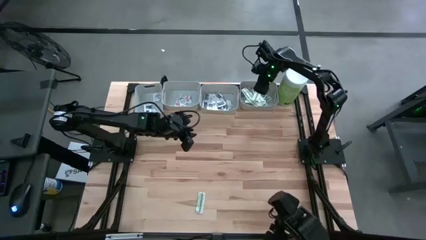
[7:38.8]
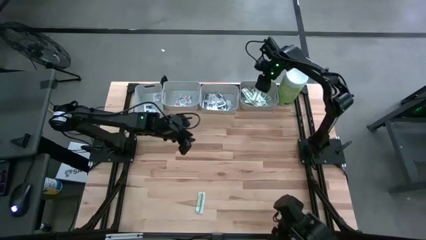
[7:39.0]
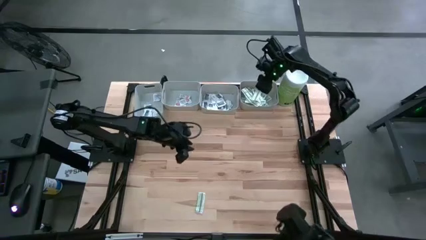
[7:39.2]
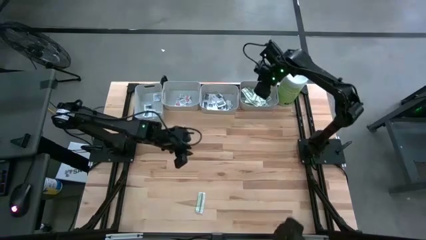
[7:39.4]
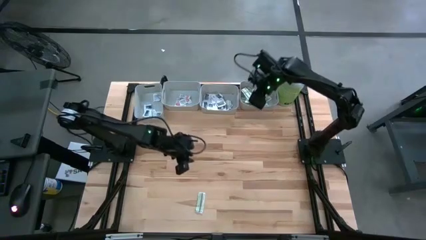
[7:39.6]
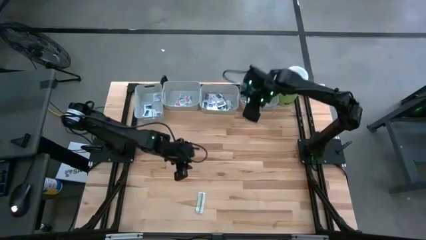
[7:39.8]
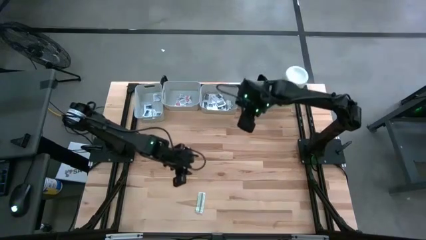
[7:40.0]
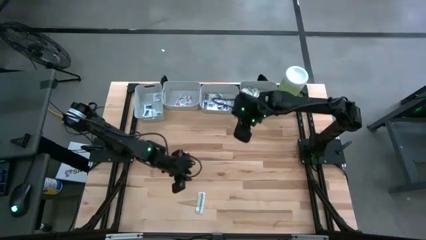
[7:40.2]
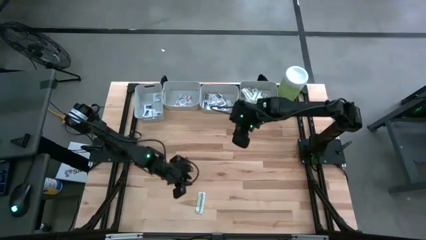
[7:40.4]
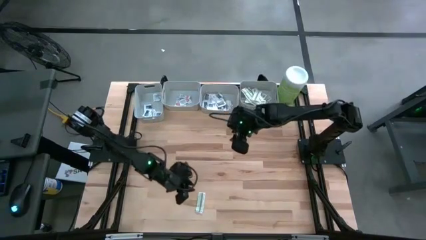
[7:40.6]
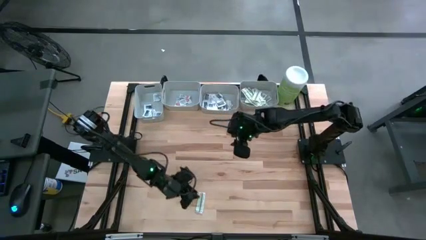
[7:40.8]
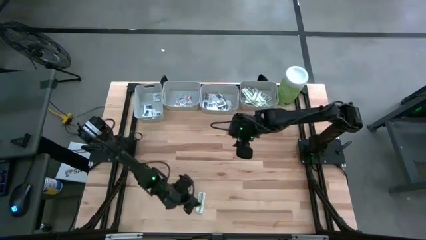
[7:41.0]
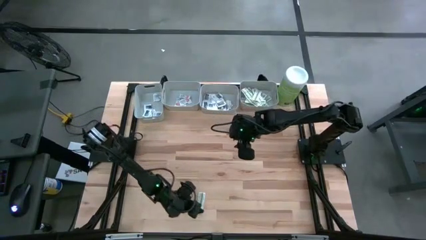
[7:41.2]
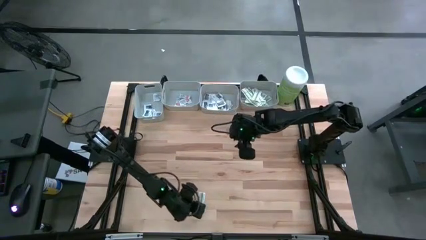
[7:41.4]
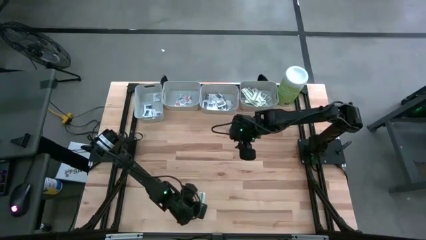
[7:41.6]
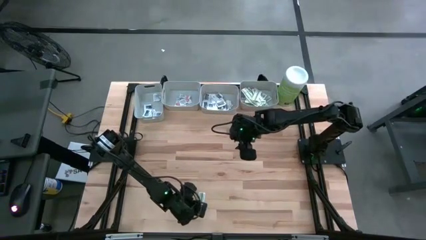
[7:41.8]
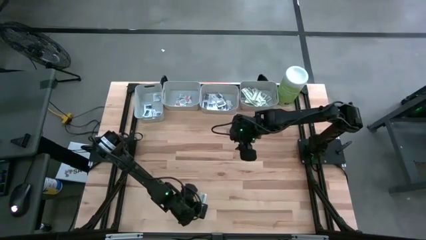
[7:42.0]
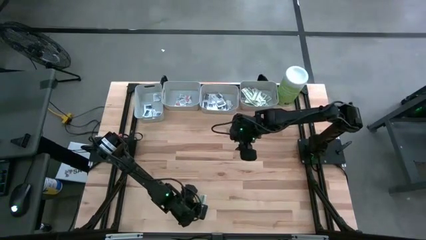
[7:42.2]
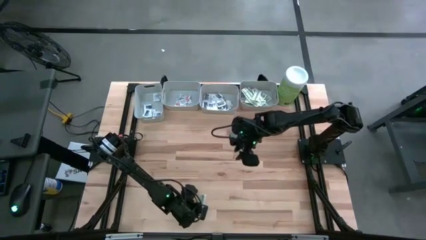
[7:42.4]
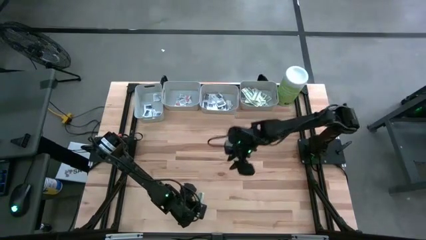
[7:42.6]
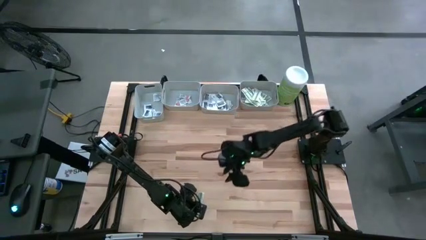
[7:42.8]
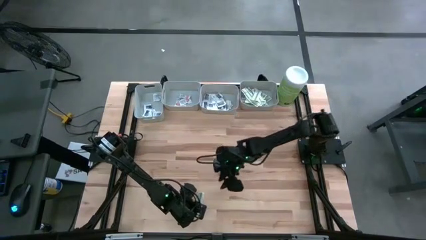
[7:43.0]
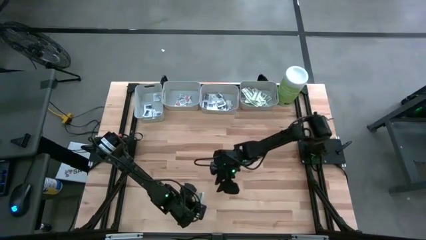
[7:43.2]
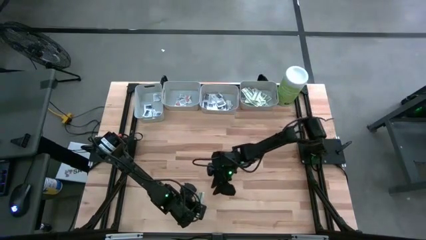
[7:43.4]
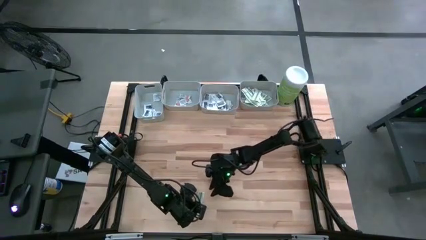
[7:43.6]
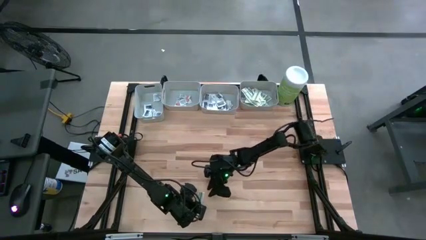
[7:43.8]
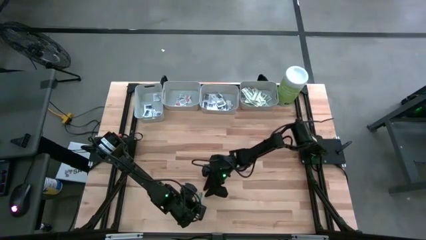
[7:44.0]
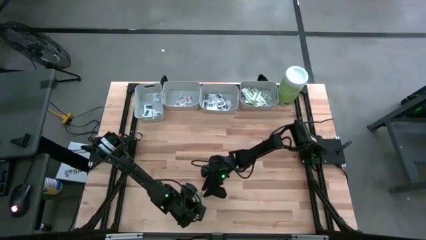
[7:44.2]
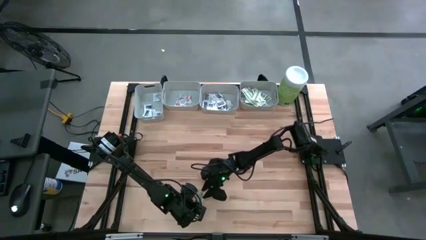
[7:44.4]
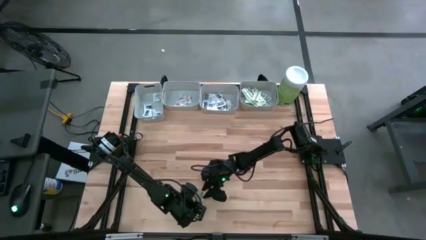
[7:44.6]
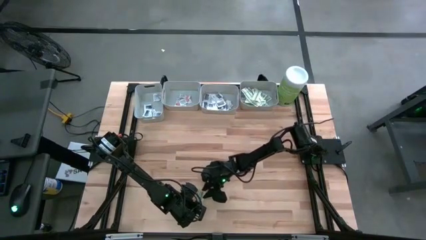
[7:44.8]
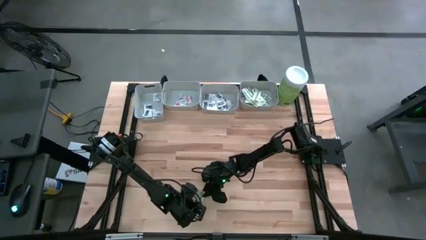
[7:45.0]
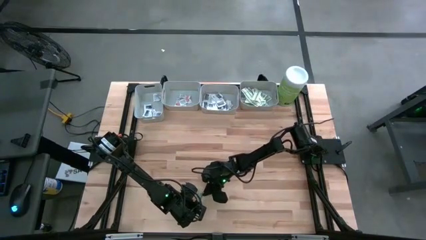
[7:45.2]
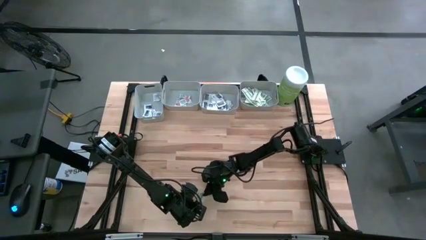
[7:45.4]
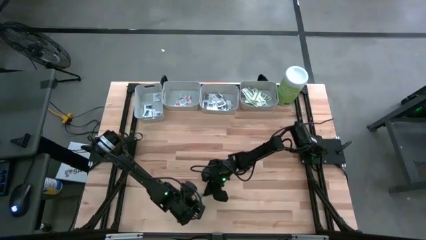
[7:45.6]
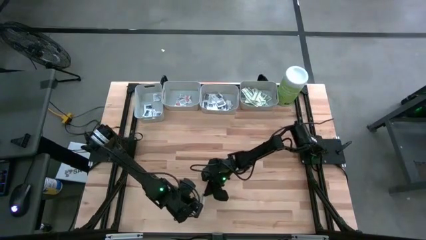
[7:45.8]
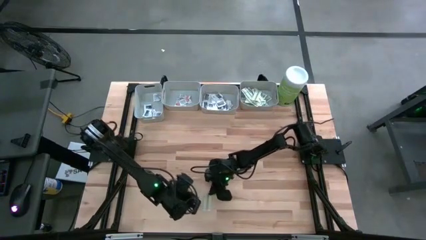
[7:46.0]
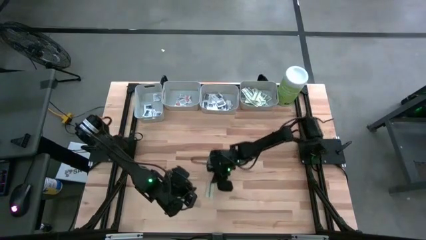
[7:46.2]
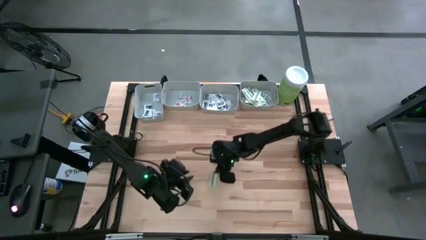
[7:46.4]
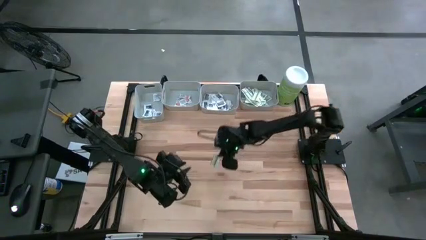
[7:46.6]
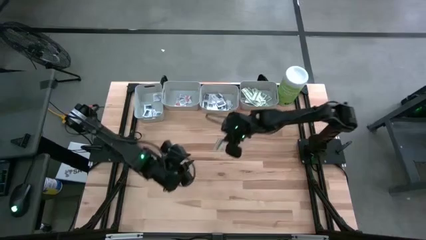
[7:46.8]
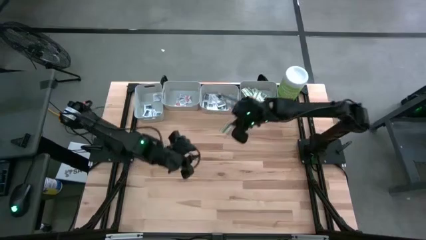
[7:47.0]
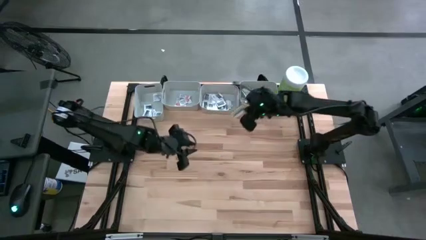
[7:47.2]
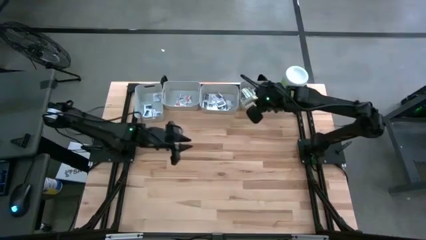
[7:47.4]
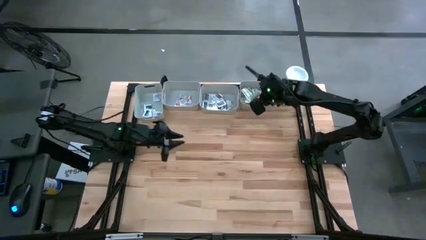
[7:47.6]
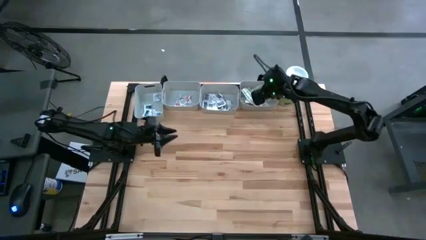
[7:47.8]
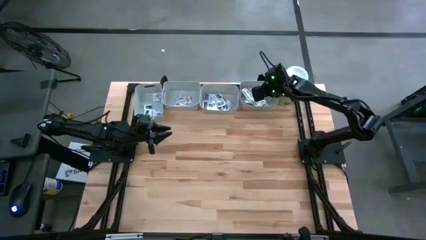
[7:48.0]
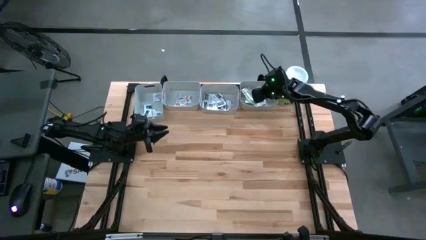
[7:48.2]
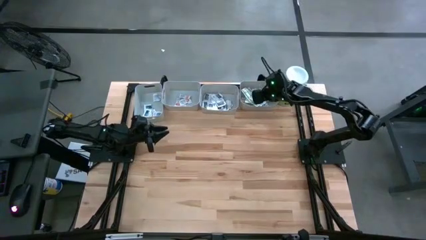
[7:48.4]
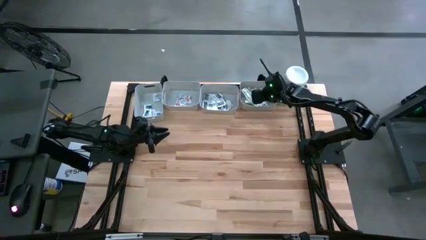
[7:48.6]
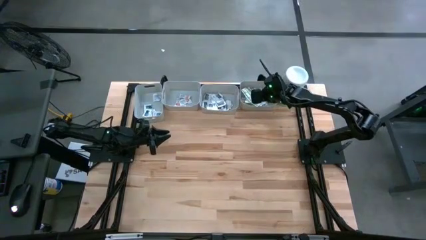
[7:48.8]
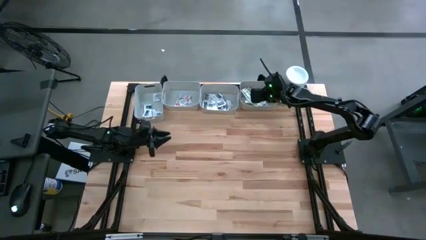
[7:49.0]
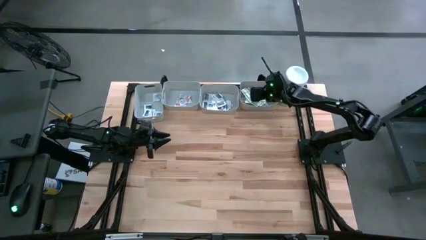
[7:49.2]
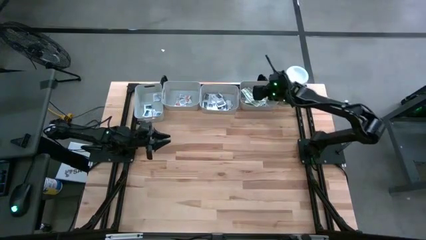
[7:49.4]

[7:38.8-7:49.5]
Task: Pick & Place First Aid Supplies
Put the green bandage into the right gray bin

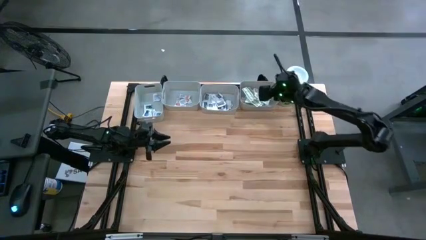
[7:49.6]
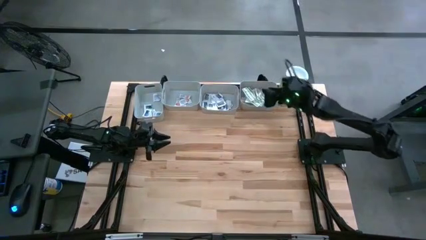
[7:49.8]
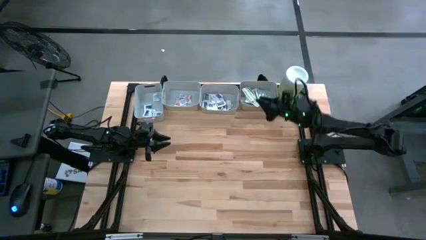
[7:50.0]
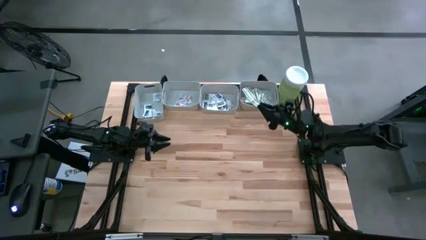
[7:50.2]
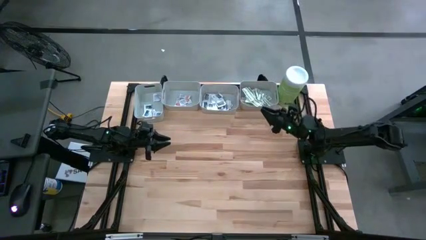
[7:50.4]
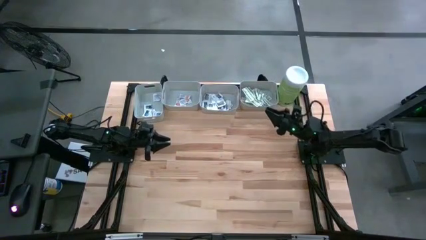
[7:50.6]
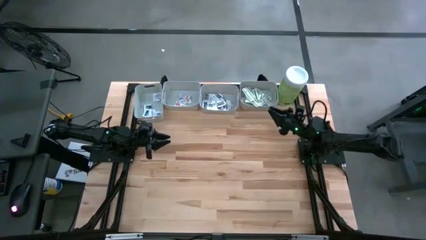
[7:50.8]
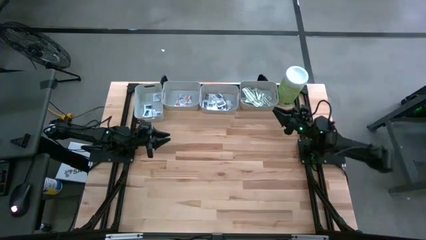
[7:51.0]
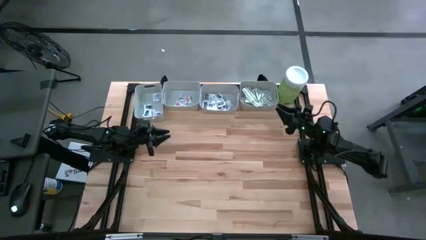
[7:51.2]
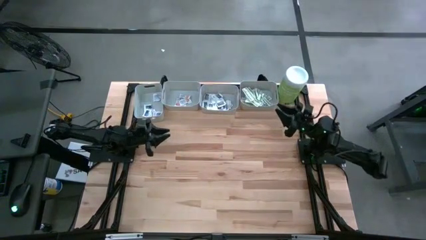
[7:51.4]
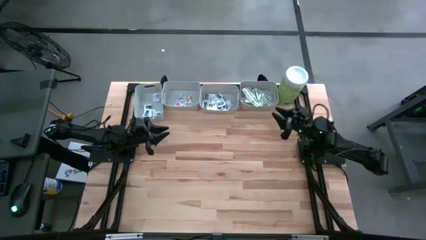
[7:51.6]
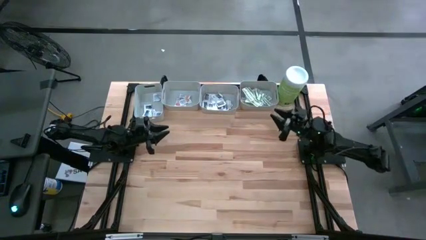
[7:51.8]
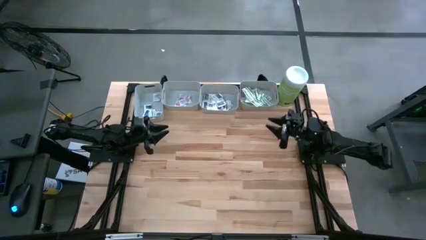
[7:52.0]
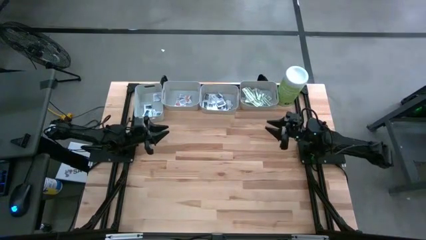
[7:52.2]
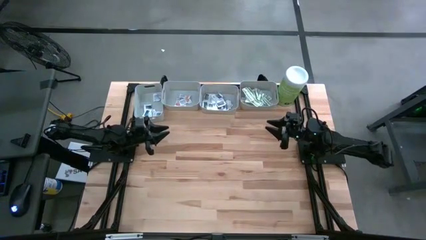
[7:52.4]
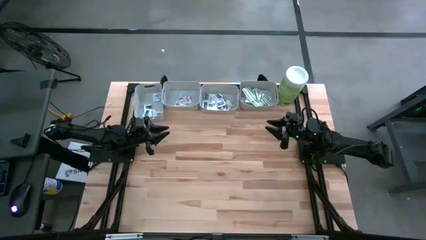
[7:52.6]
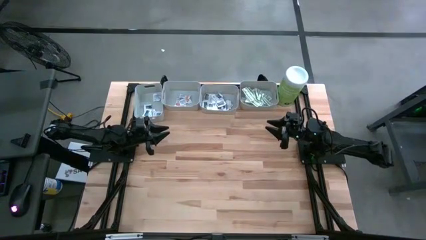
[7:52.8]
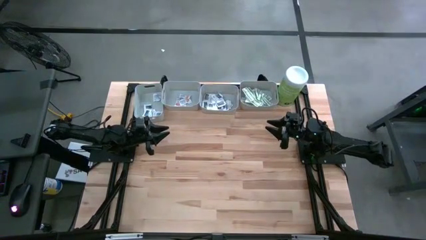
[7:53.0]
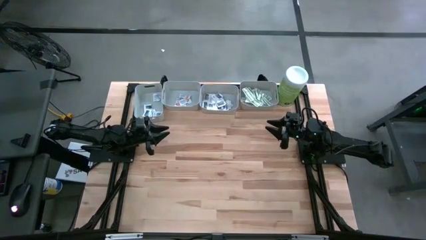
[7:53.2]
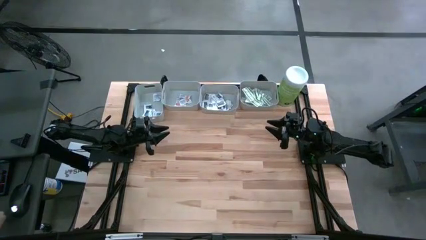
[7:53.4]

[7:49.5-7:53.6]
Return to Home Position

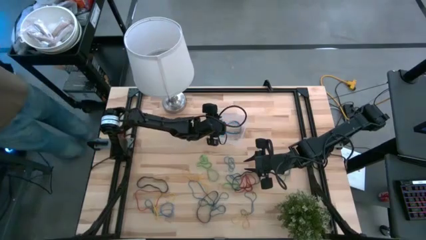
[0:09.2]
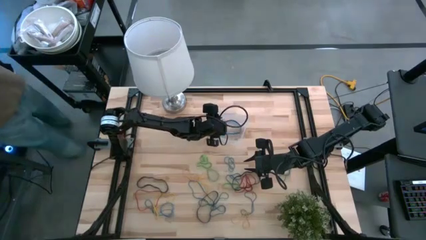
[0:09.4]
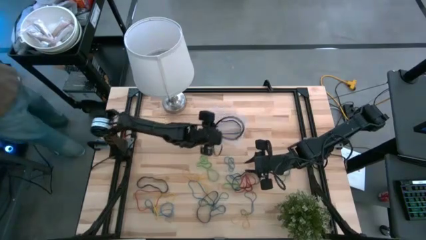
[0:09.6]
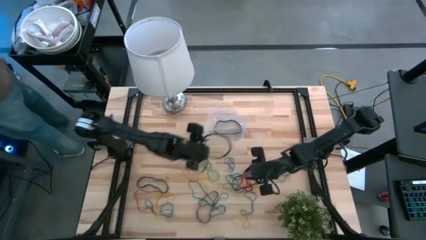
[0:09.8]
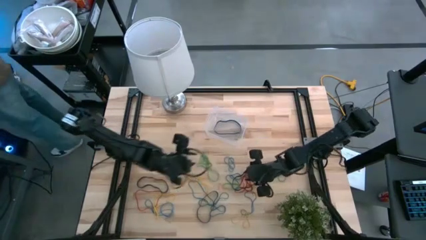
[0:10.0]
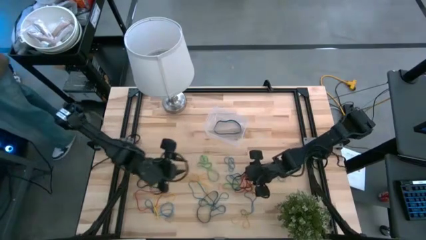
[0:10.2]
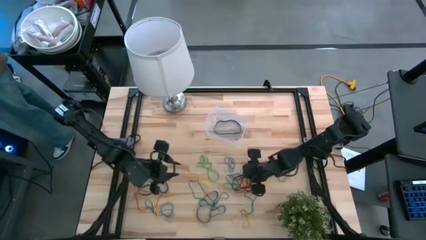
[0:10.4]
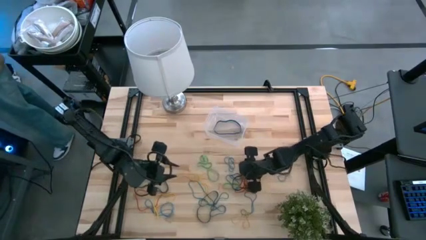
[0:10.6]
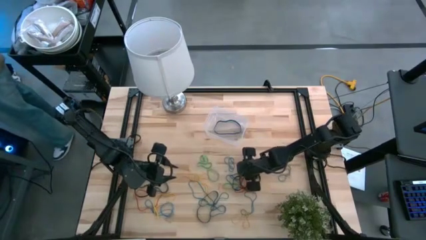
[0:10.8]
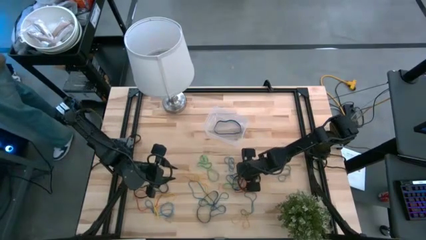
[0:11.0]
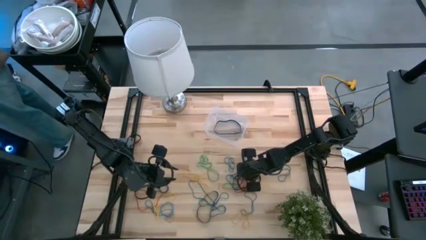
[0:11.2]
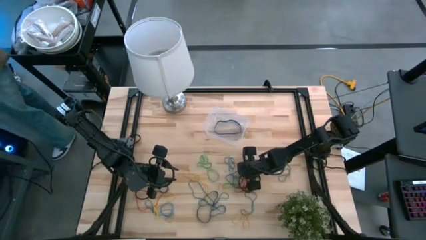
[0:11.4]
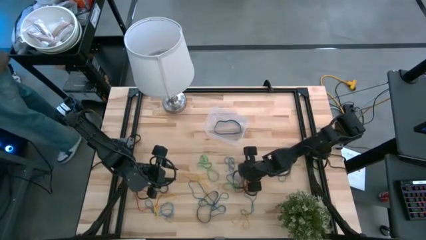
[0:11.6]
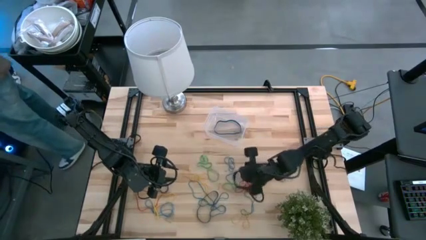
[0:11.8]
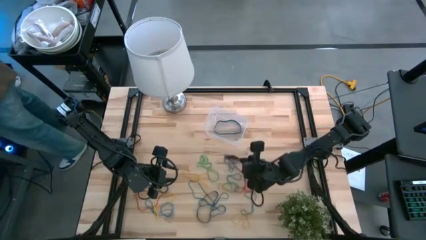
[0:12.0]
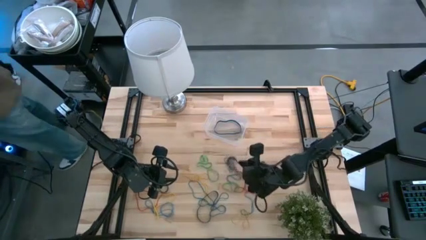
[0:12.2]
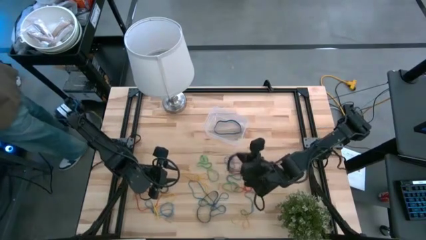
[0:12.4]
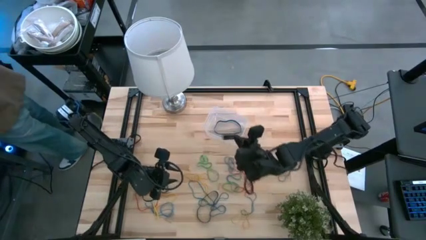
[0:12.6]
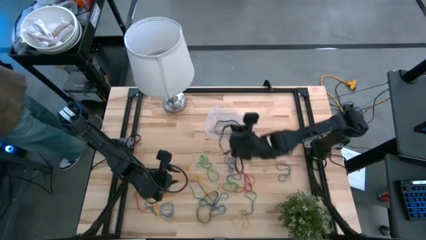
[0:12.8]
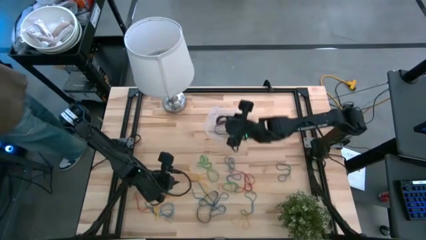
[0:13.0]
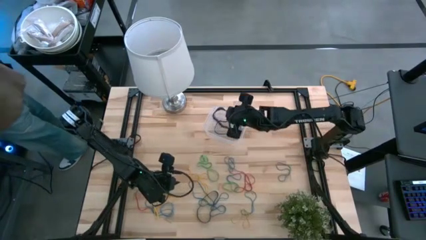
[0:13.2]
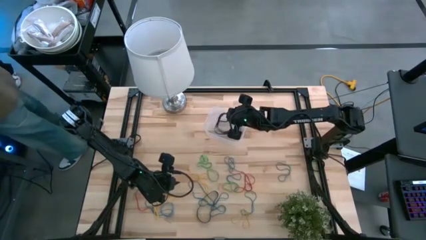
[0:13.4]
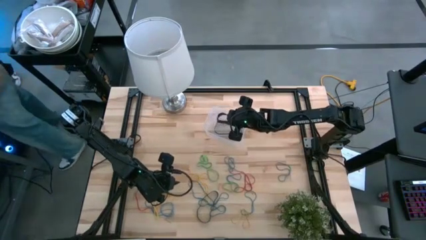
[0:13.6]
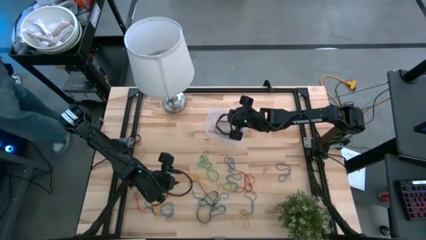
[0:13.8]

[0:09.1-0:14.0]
Task: Pick and place rubber bands into bin
Put the black rubber bands into the bin
